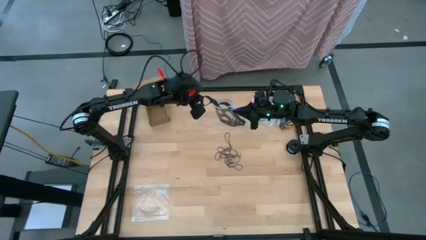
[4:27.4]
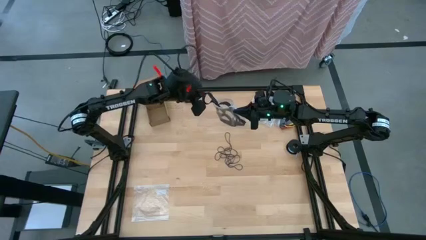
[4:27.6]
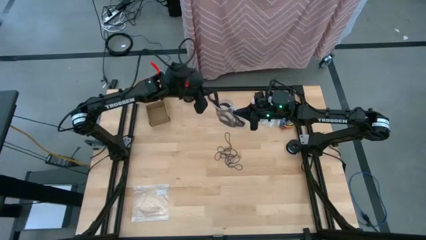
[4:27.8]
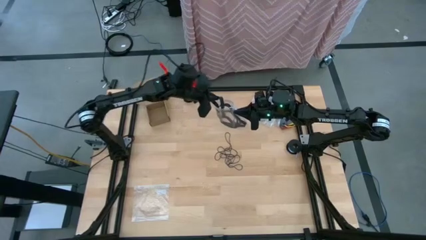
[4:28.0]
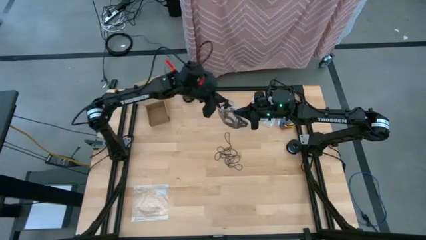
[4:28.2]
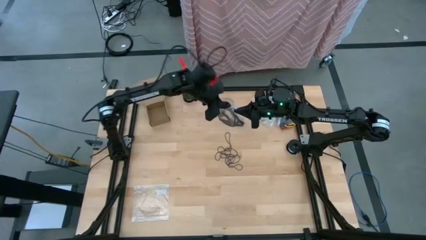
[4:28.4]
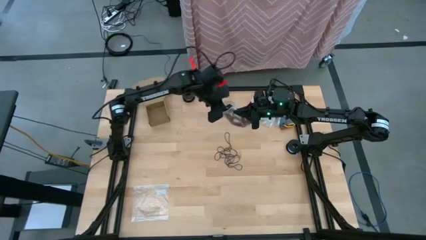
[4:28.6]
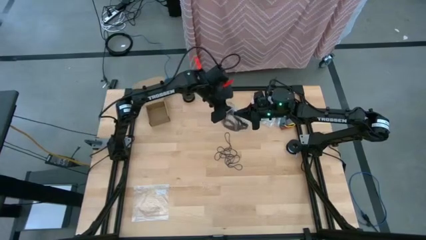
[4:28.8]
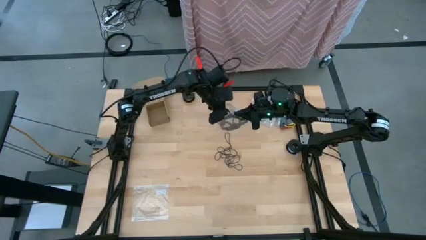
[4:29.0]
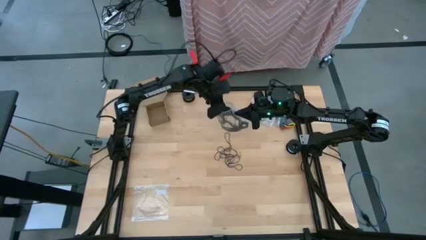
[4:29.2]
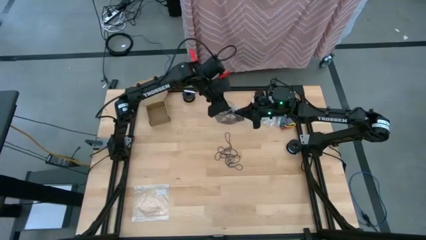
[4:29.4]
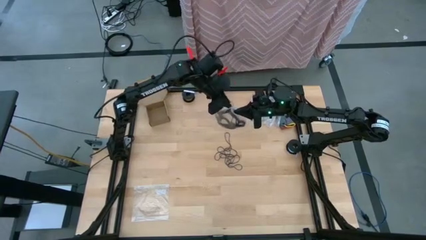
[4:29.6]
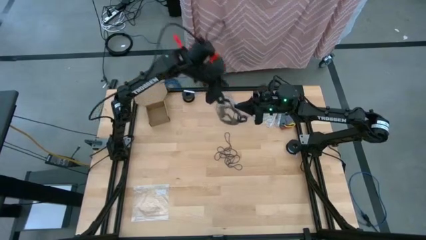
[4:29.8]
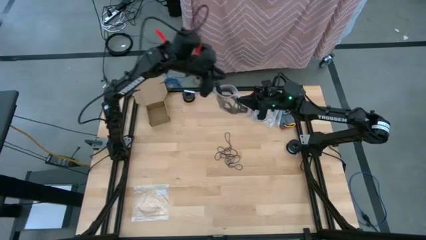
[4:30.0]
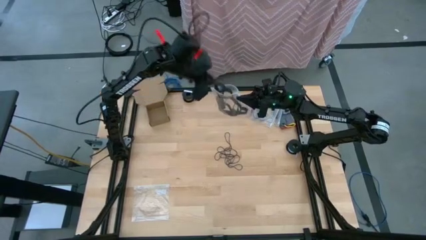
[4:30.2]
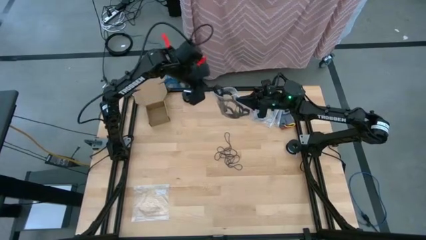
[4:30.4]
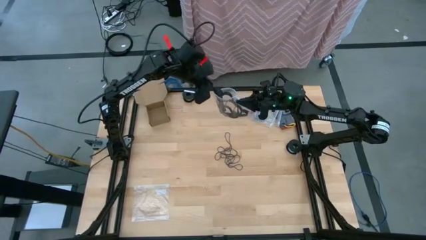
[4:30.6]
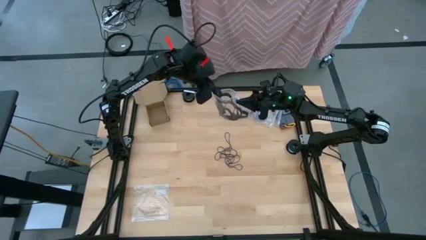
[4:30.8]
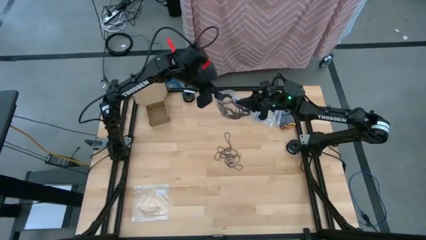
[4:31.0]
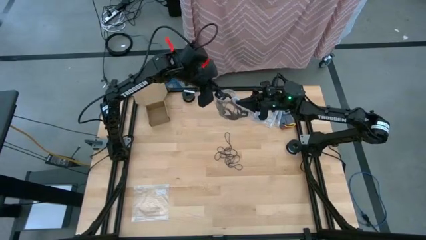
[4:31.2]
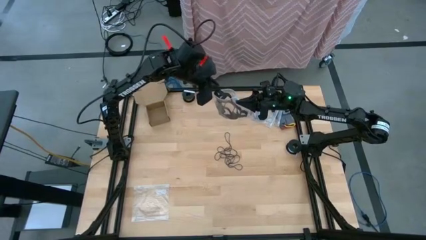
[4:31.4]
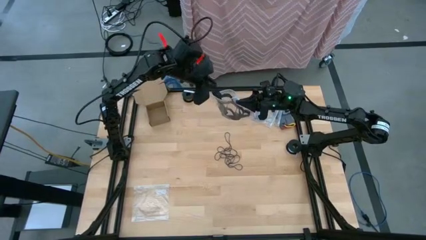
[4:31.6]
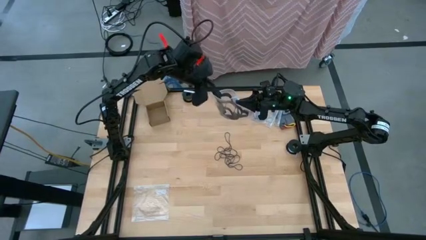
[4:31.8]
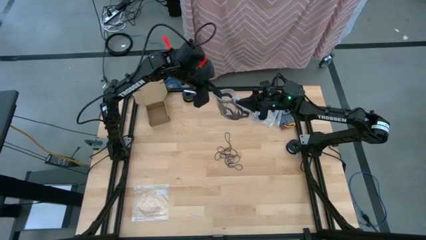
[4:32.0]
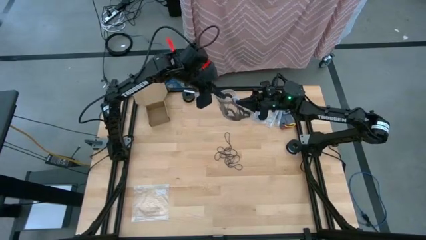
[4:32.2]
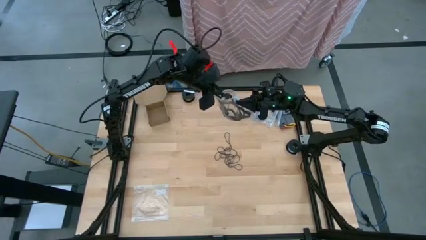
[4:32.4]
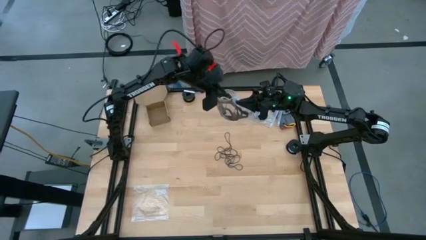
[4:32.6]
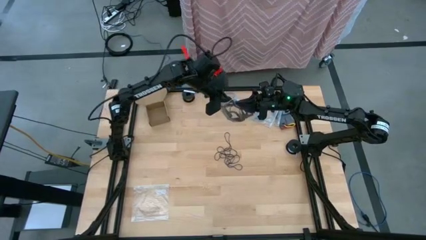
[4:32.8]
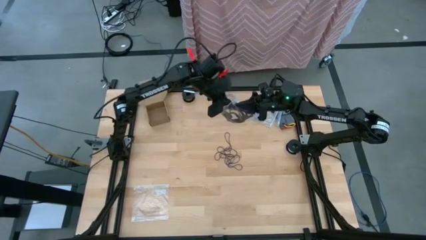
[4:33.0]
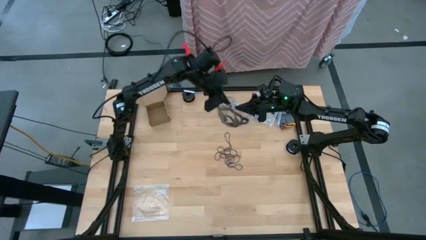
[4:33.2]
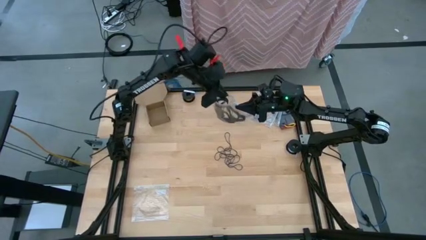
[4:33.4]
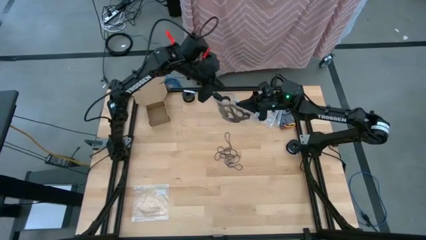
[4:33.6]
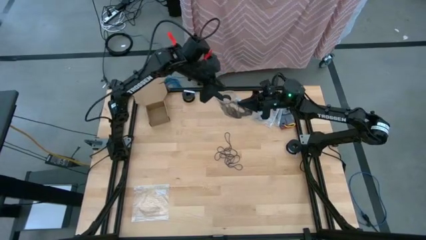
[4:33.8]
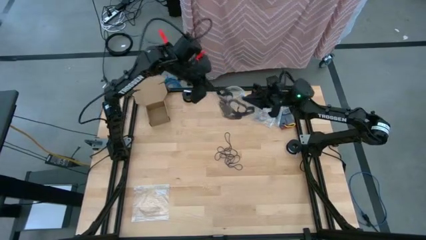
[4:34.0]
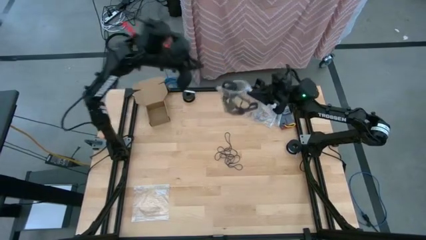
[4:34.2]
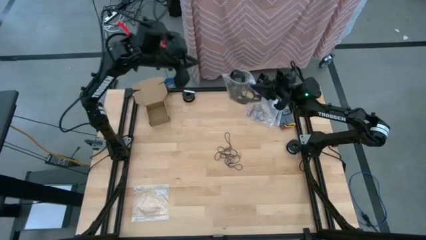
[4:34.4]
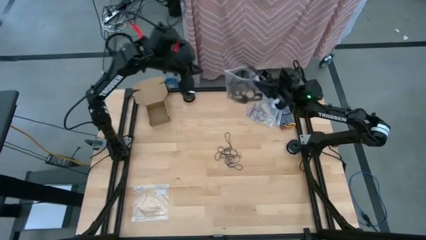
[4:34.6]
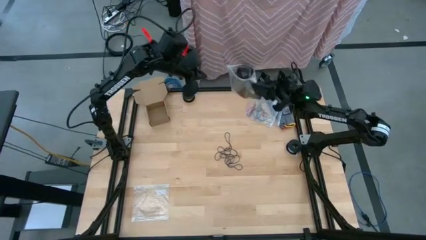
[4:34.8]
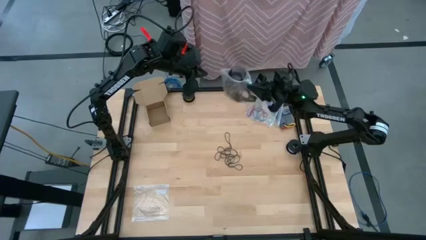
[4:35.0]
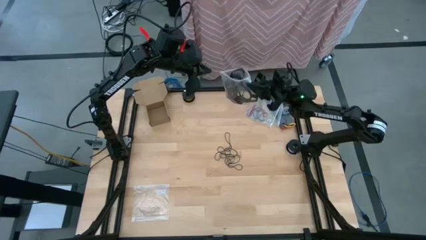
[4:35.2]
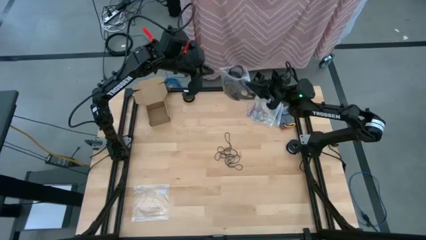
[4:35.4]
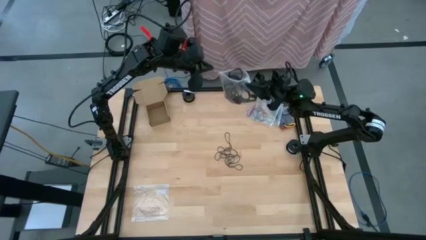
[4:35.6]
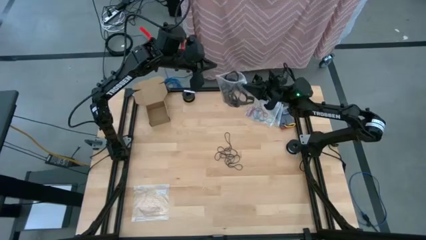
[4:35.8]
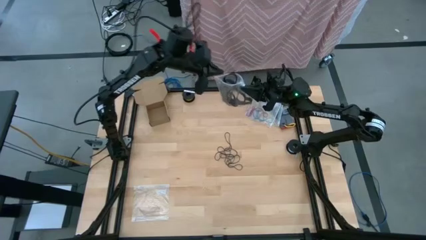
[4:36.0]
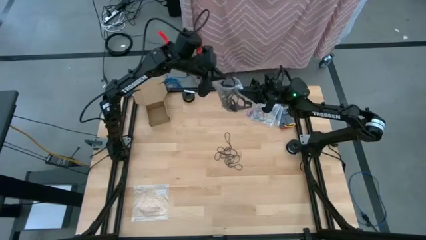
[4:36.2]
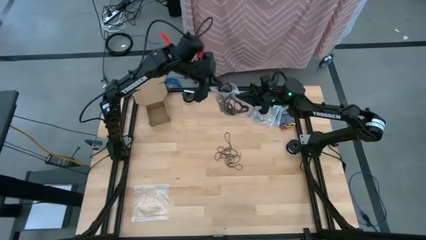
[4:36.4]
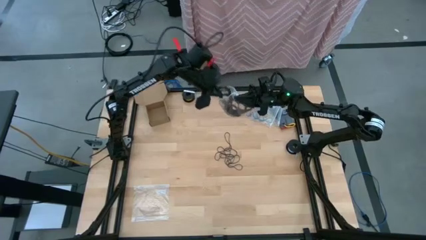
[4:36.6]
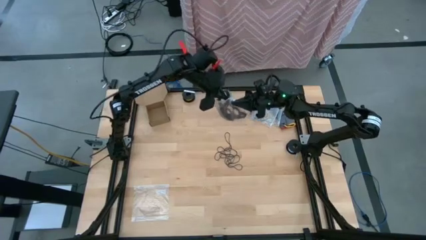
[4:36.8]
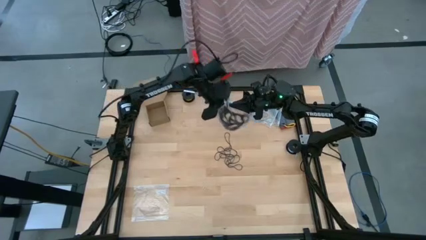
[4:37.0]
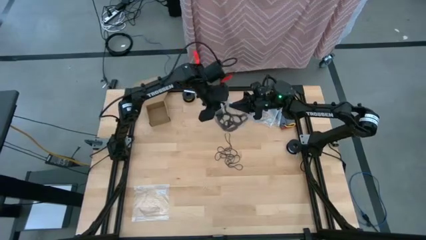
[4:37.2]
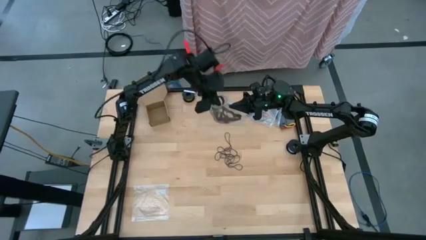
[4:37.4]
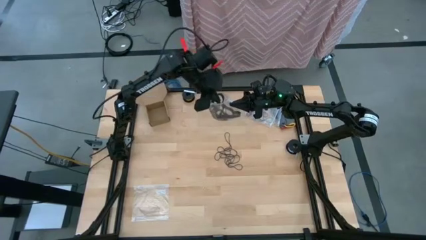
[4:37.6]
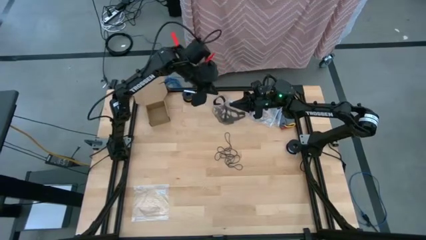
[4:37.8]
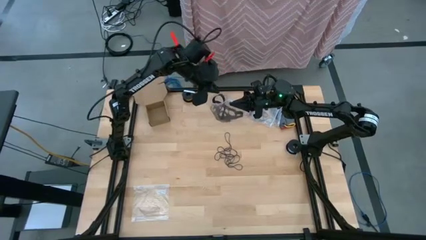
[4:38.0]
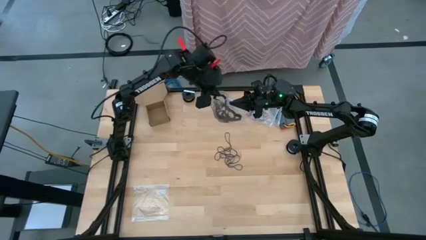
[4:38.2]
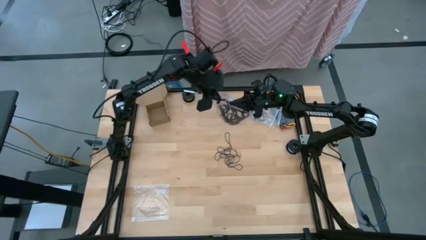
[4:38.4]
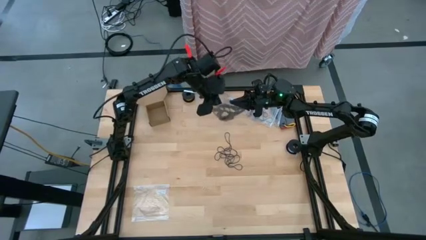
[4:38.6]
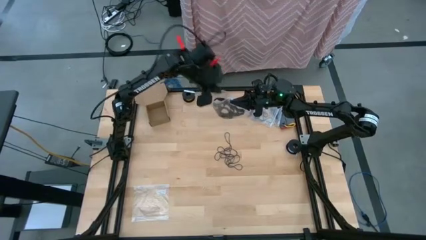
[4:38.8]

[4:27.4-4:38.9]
Task: Sort rubber bands
Put the black rubber band into the transparent zip bag

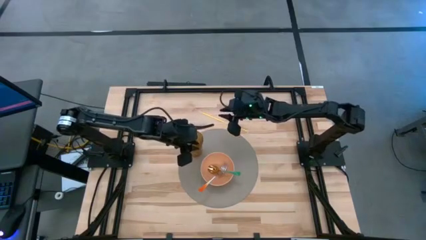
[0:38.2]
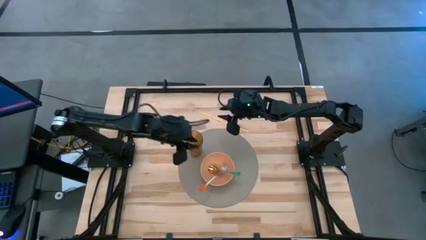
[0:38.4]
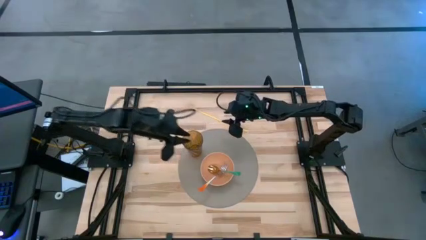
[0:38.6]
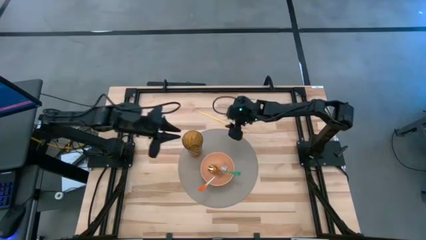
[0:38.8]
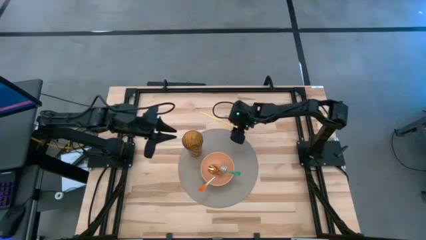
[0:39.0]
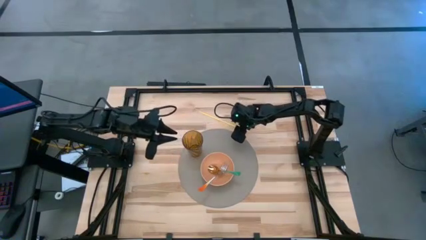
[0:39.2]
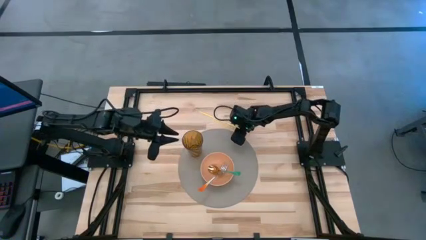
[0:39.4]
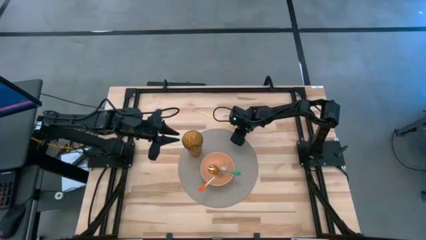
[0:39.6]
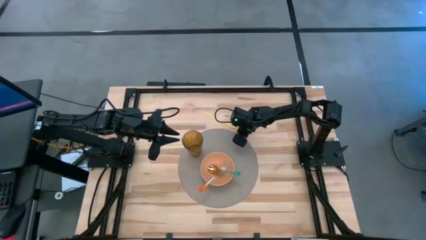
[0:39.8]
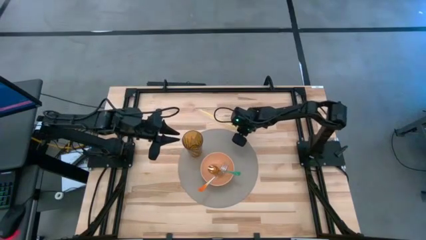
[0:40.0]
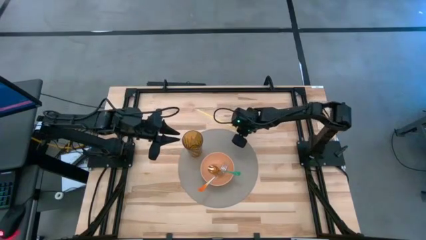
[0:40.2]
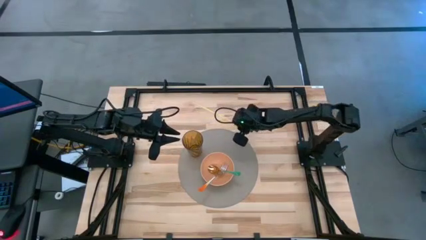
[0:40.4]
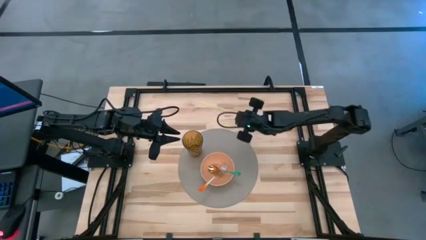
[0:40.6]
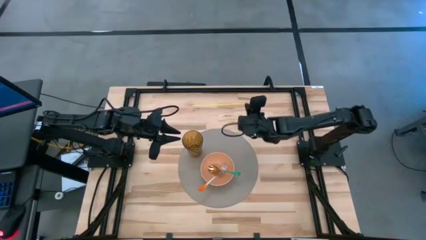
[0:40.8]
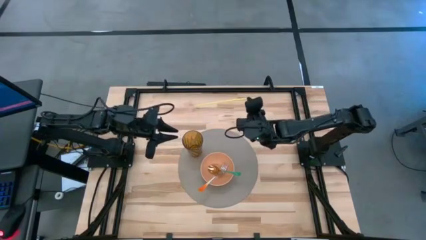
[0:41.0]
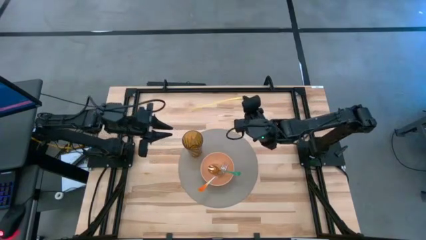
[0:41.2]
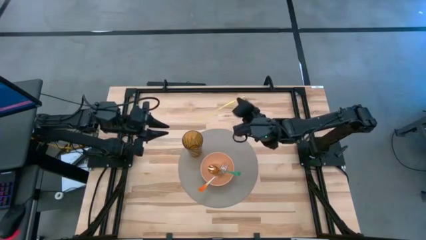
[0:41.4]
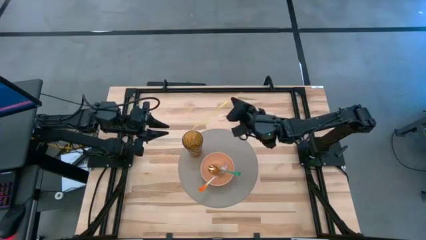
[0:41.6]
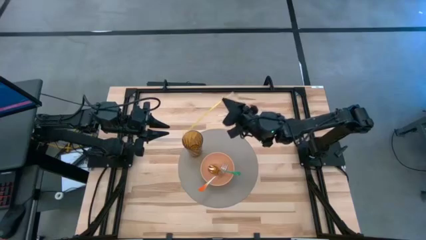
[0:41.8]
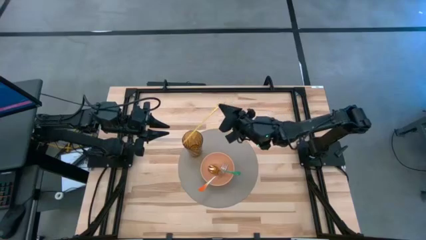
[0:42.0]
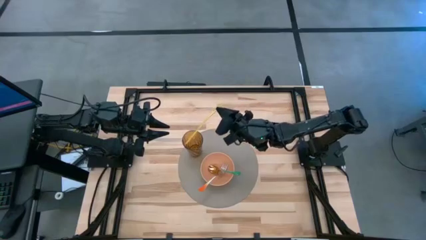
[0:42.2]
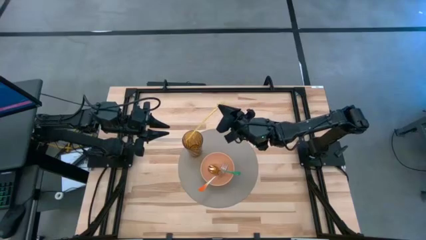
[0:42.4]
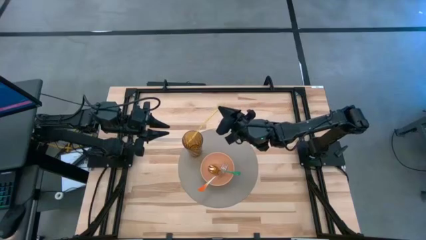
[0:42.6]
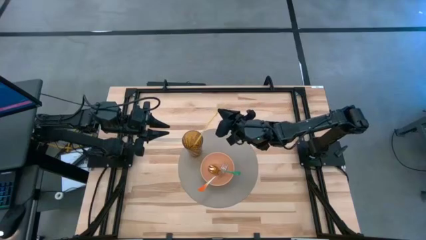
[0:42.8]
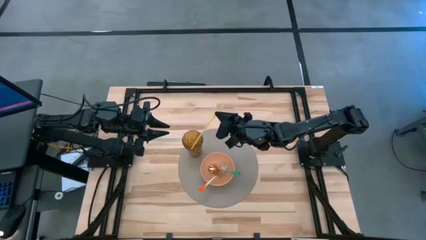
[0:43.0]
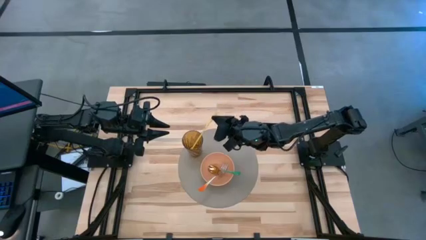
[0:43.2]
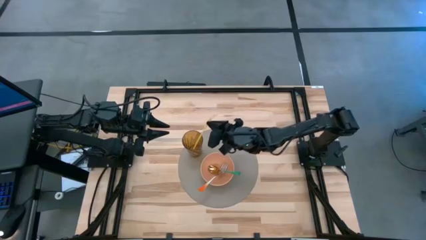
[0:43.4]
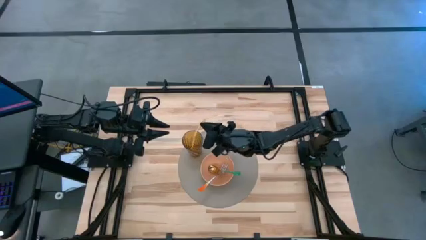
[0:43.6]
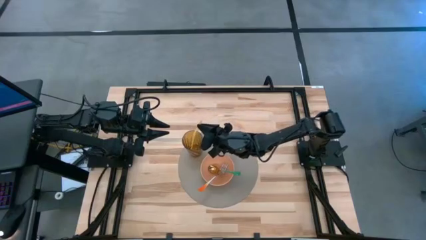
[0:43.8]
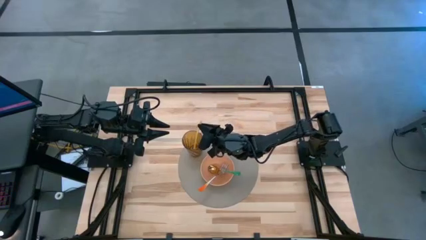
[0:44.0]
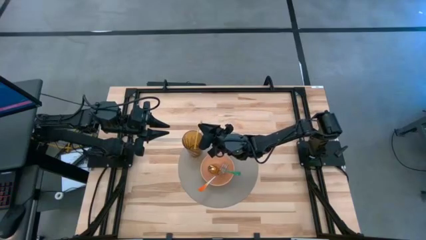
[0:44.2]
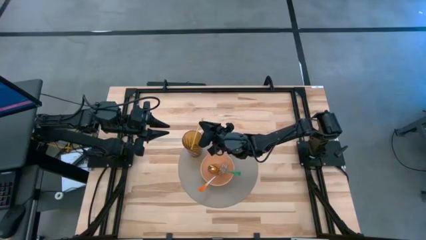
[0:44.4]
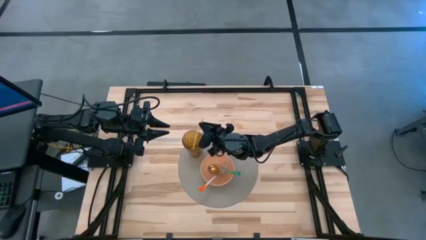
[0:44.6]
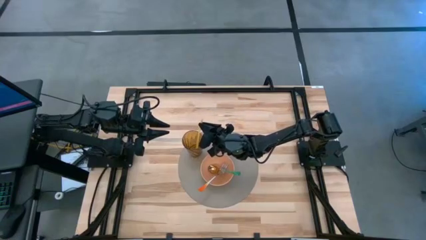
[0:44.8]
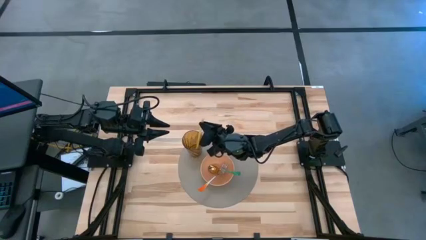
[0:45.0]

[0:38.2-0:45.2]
Task: Pick & Place Utensil
Put the yellow drinking straw into the brown cup
